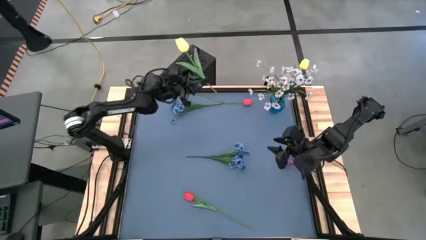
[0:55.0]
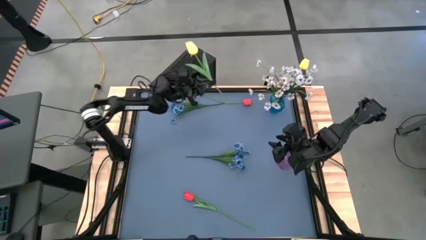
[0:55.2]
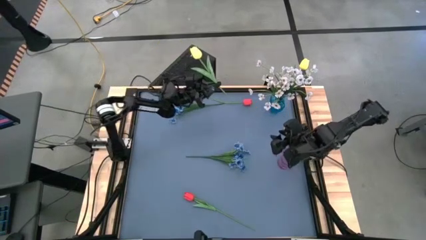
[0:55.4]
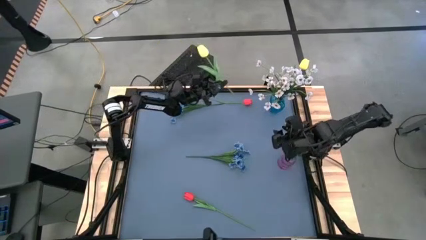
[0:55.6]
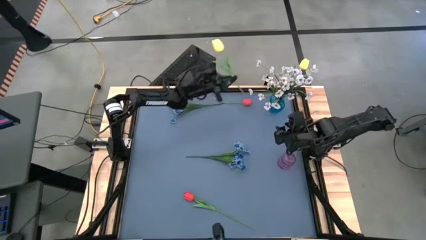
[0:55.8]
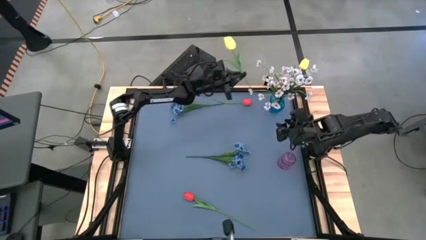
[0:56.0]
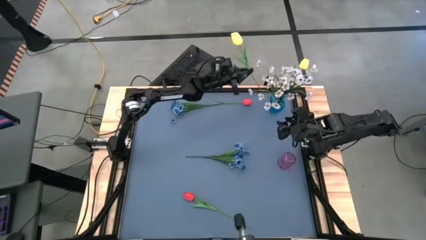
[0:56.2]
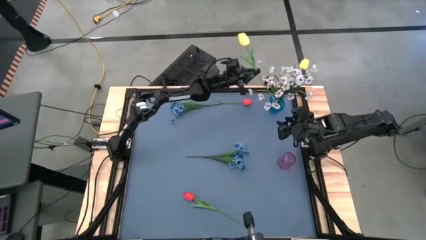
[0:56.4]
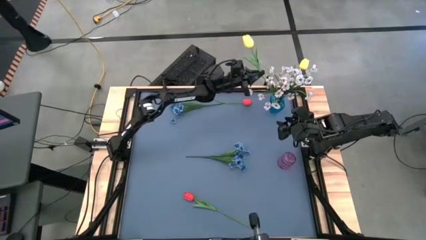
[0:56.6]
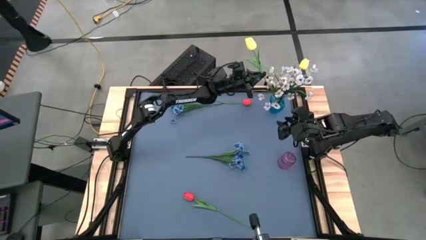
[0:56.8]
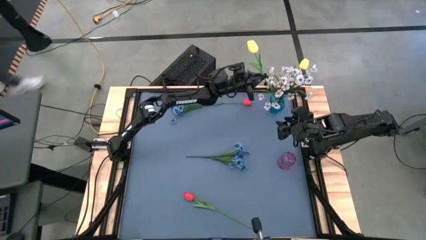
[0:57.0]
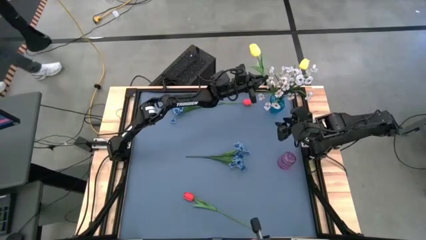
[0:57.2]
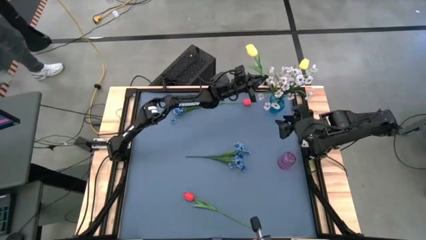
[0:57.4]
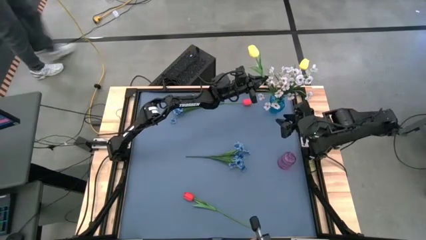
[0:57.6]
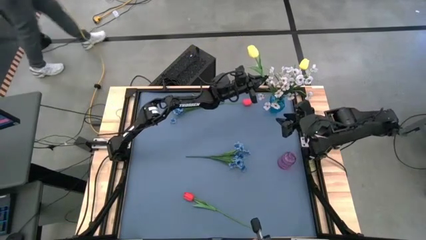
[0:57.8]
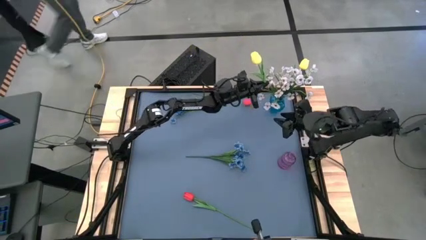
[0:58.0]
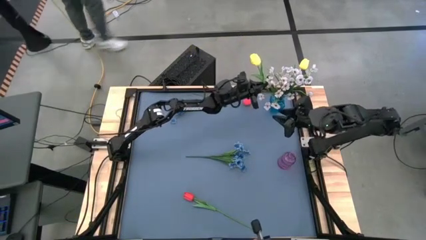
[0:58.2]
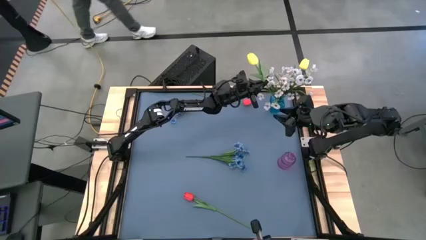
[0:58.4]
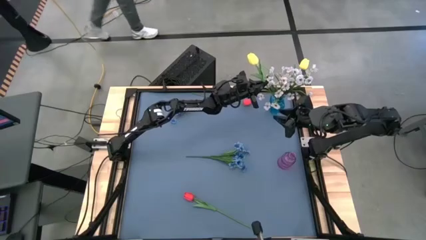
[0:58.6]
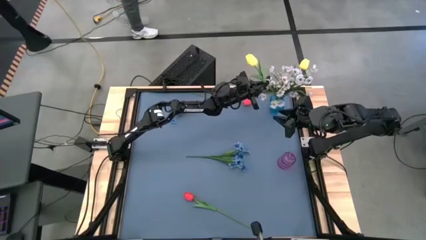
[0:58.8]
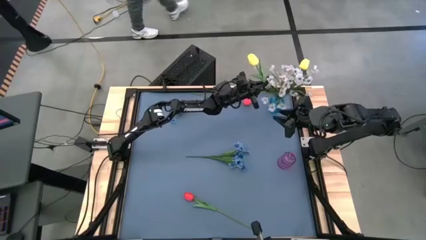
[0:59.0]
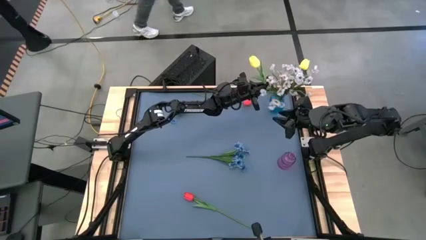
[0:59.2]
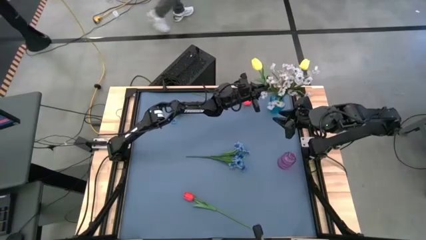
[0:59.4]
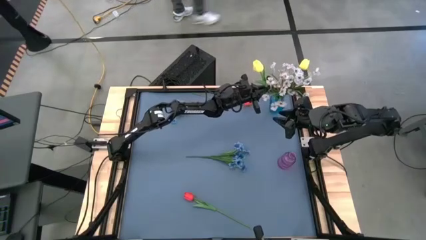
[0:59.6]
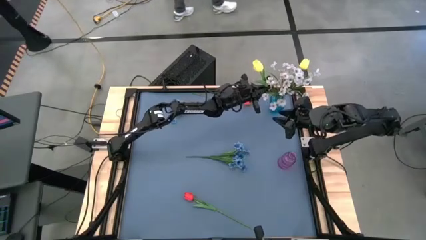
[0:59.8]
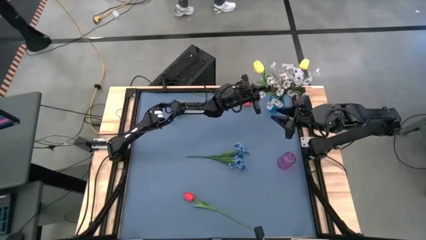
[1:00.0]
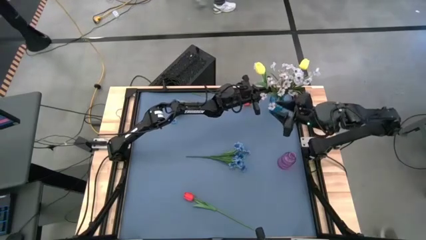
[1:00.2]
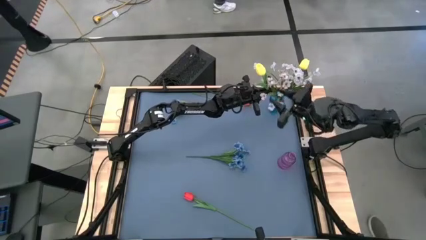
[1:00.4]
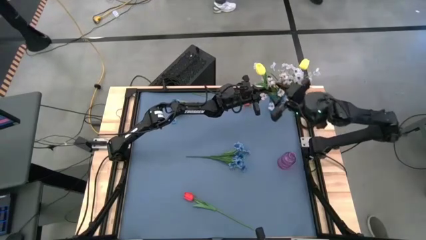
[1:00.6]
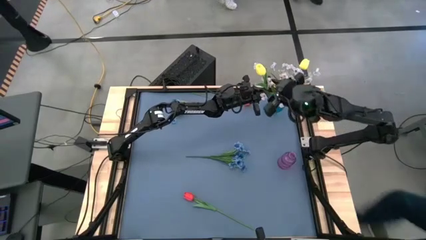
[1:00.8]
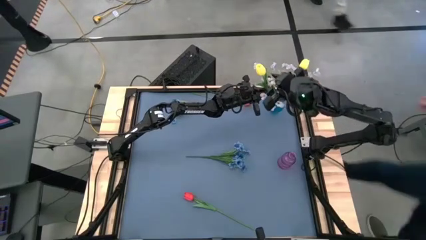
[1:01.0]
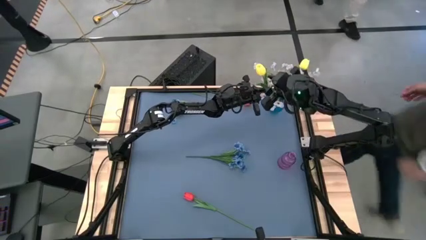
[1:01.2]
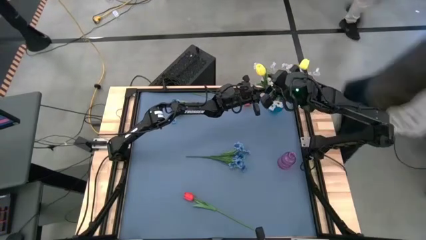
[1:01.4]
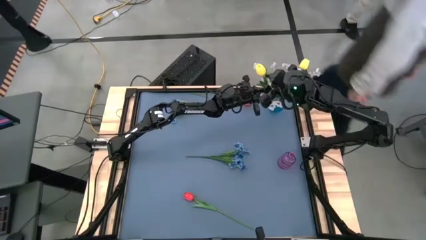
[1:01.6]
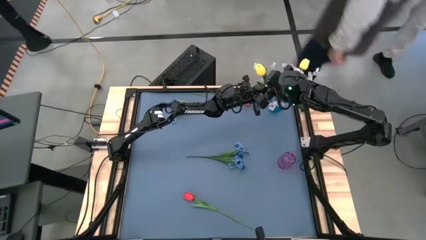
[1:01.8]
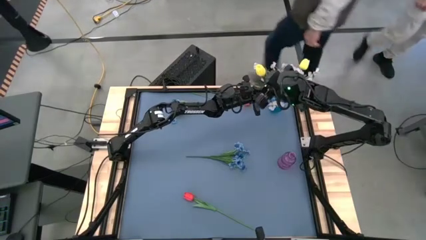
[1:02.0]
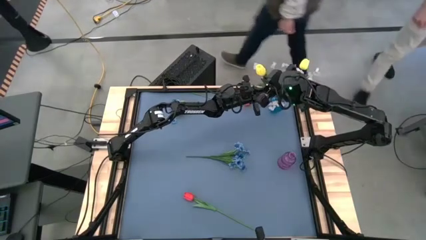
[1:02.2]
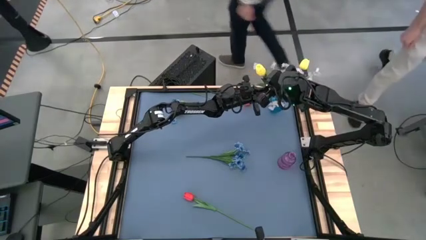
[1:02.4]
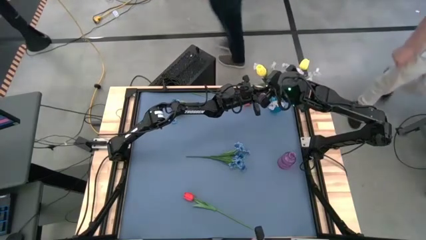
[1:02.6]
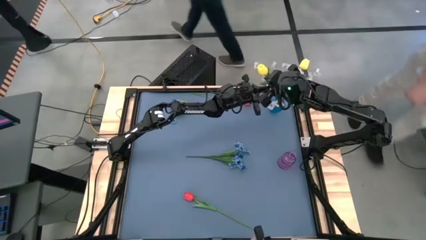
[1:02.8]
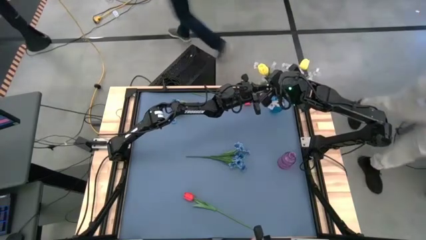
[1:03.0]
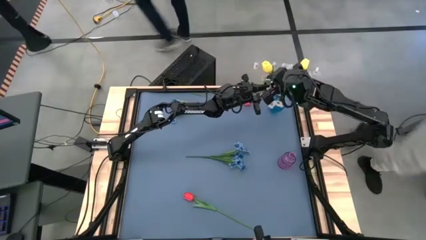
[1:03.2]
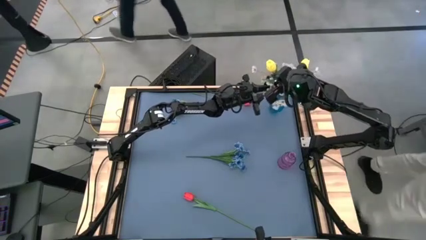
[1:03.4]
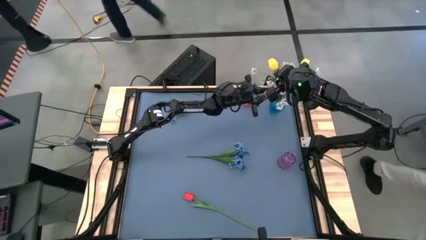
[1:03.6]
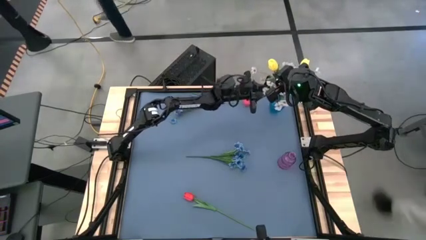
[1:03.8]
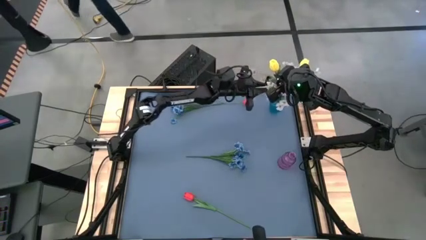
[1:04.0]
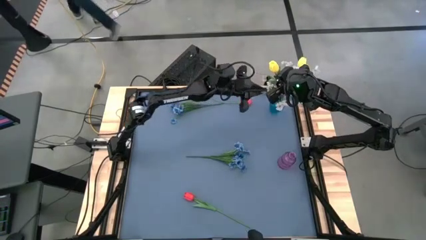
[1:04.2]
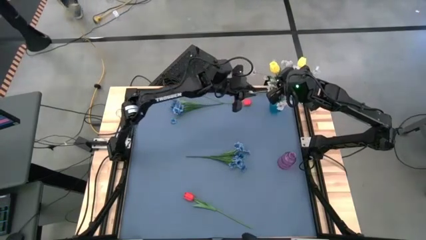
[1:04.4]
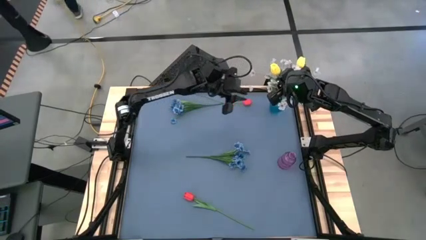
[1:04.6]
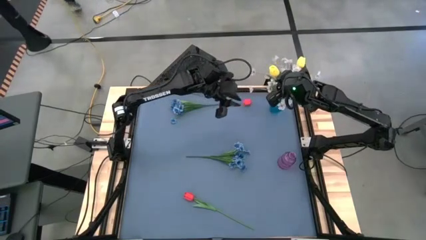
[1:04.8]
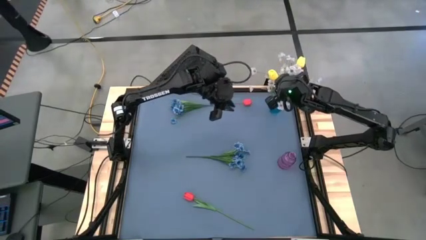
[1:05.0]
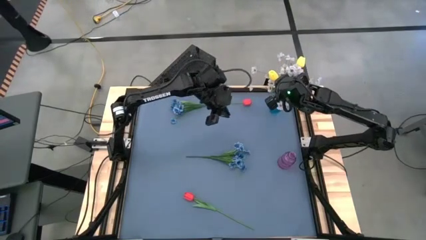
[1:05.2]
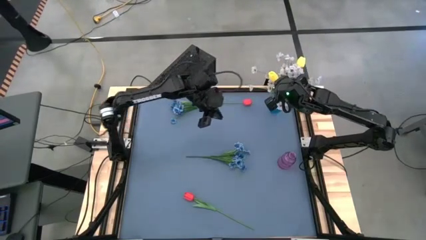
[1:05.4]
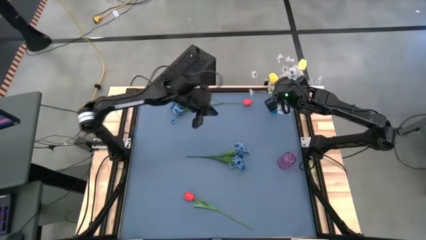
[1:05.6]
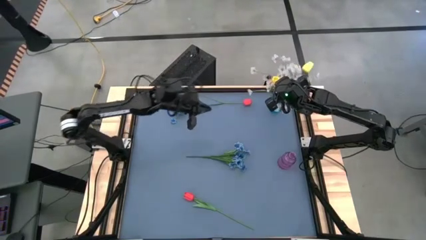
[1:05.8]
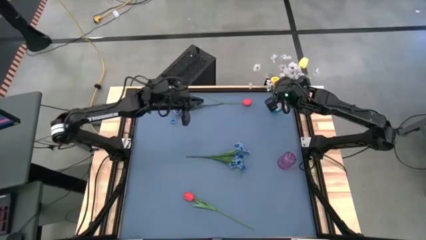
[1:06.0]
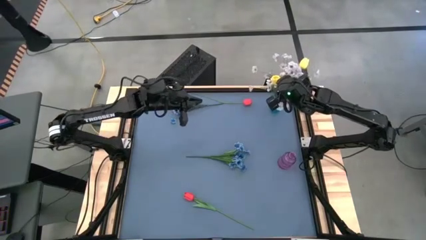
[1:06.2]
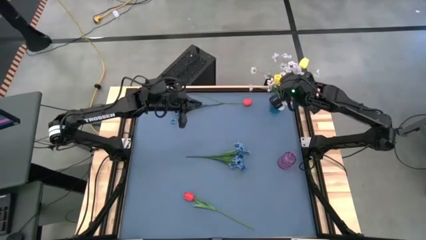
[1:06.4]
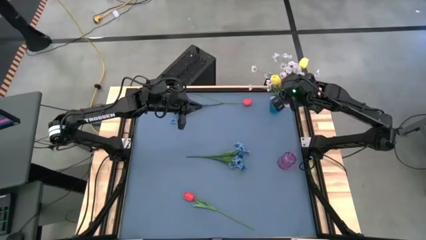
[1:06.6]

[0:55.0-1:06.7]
Task: Sort flowers into vase by color
Put the yellow flower into the blue vase
